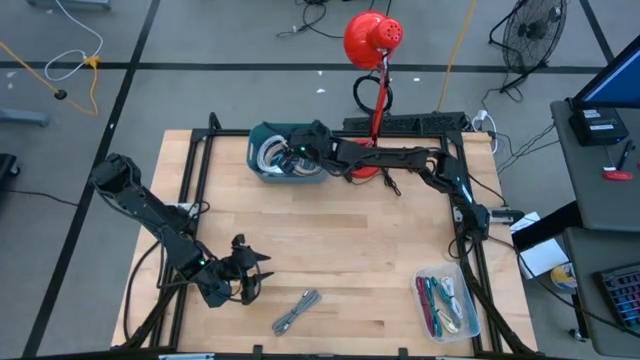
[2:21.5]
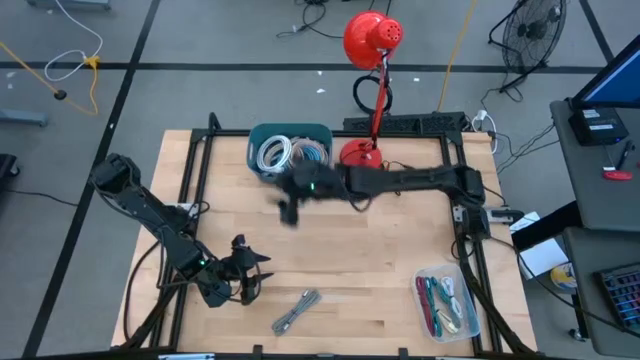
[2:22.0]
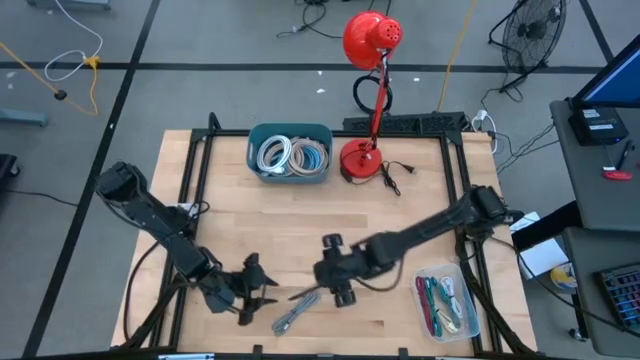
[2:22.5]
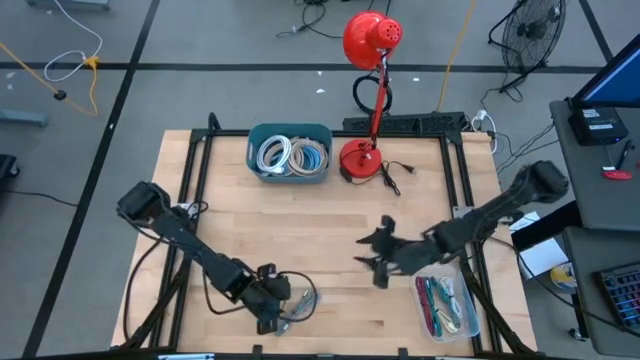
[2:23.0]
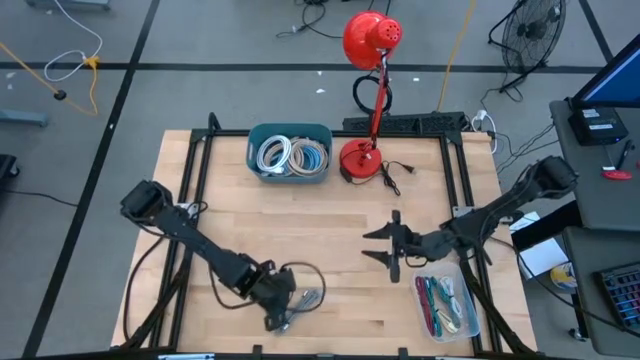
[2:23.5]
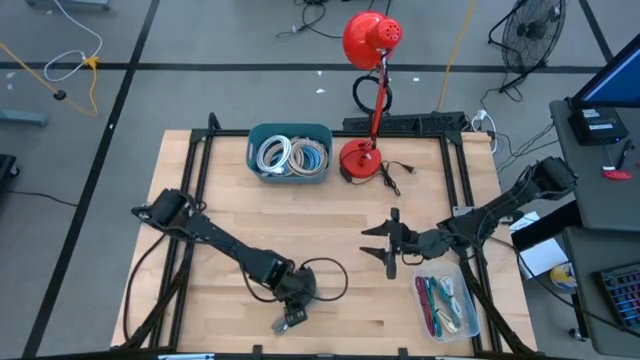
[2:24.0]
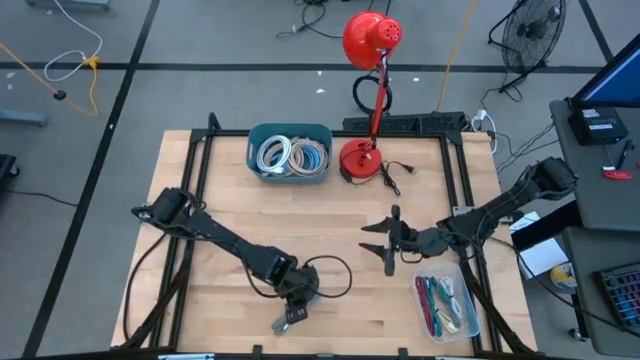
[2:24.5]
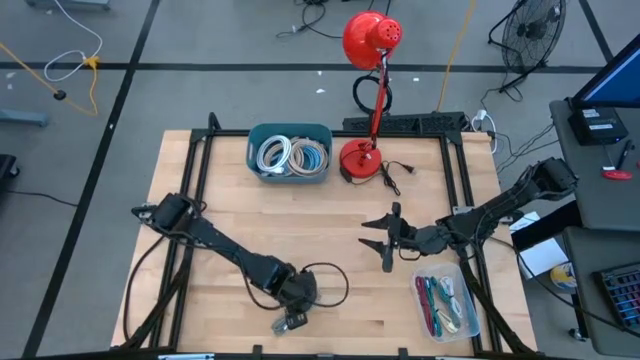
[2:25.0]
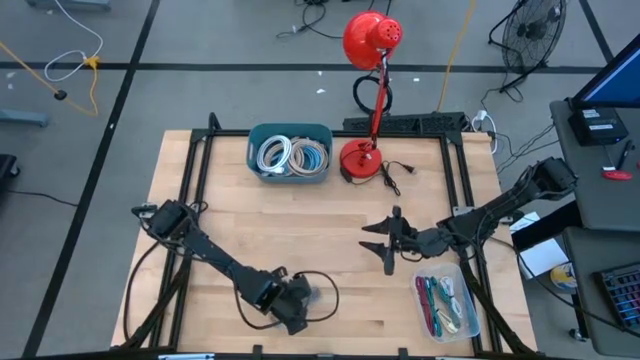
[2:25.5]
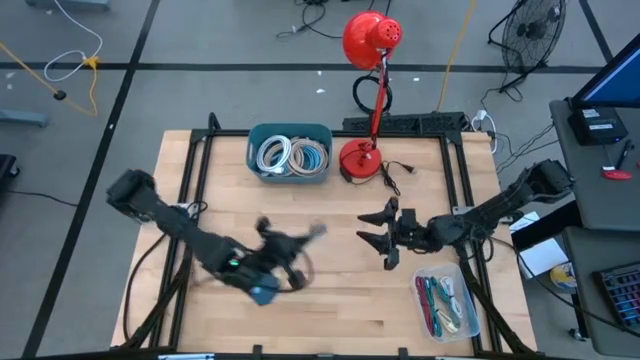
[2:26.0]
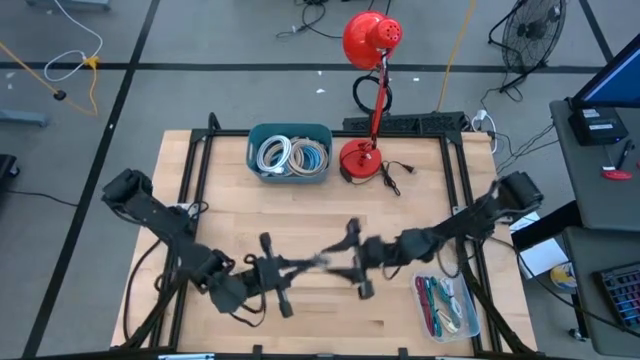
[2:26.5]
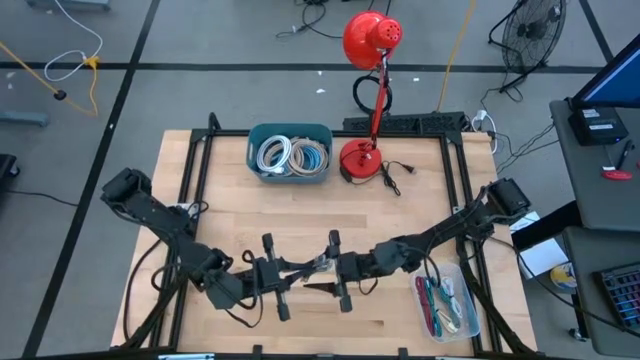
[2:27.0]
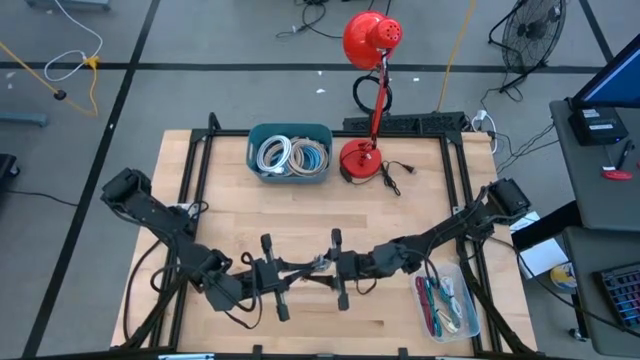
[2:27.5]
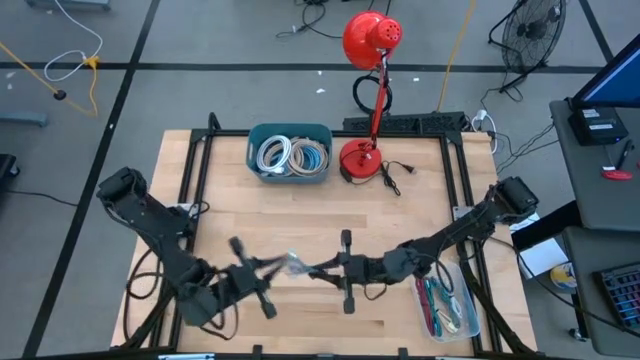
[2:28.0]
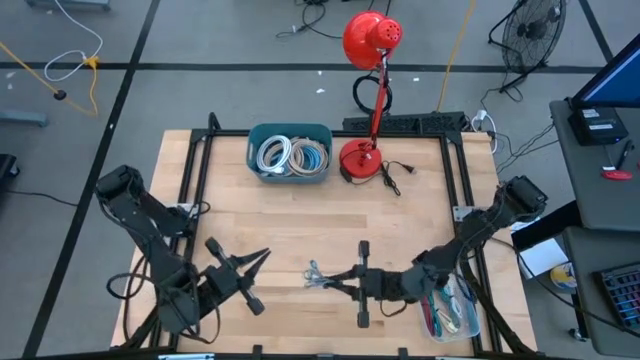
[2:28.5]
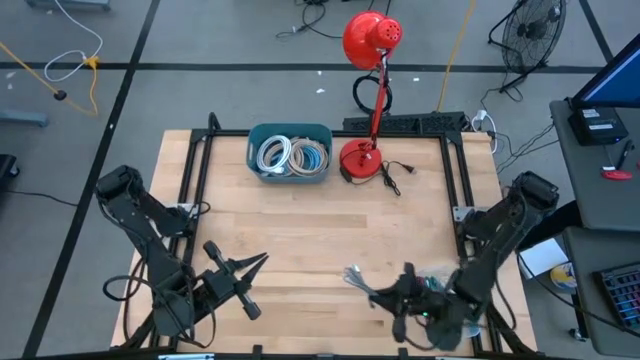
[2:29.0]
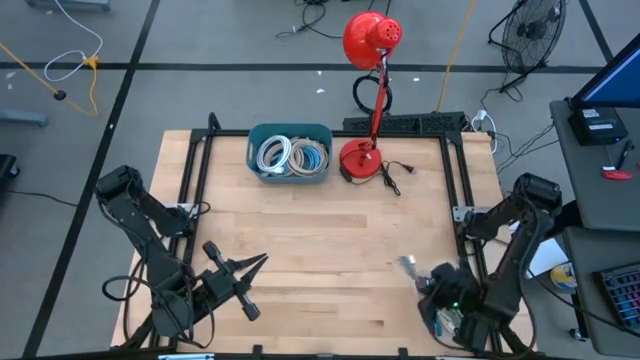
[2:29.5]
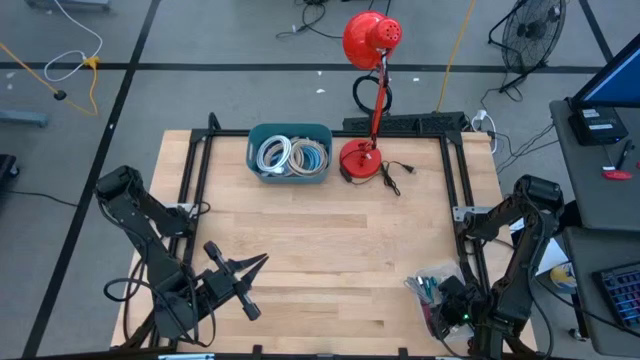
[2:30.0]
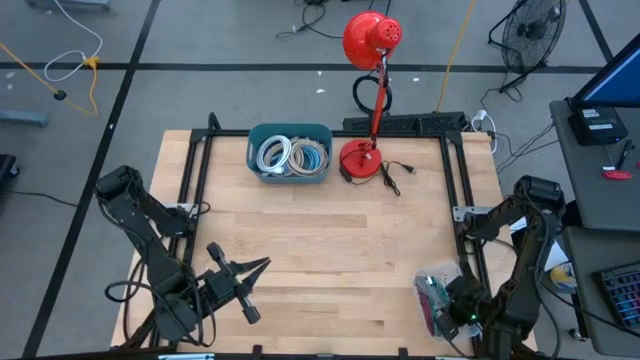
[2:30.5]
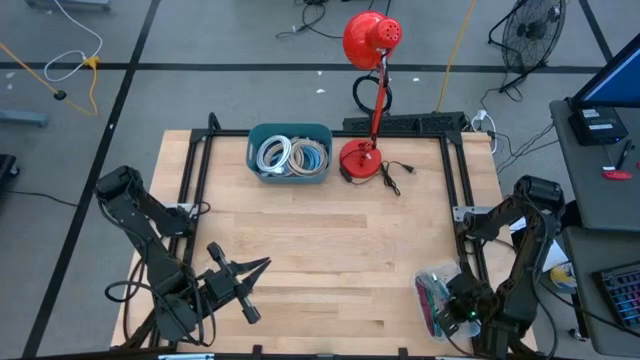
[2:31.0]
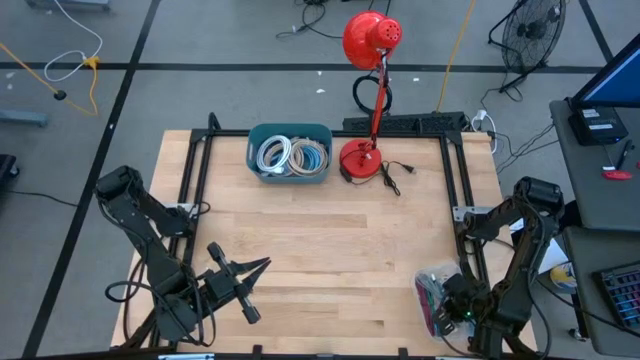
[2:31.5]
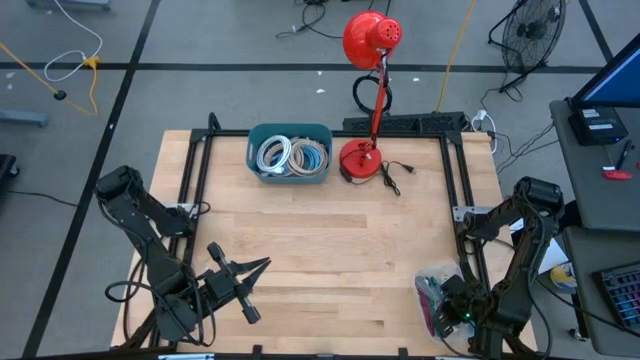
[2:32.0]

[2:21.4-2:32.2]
Task: Pick & Place USB Port
Put the black charger cable into the transparent bin

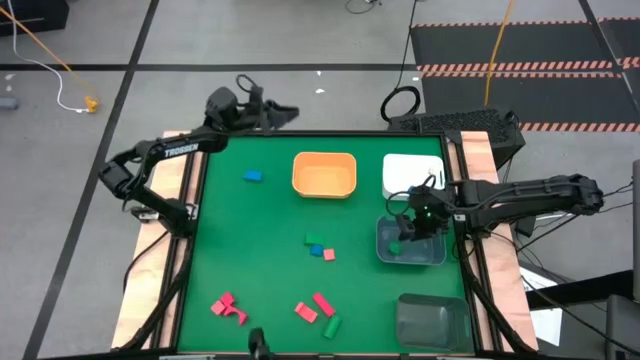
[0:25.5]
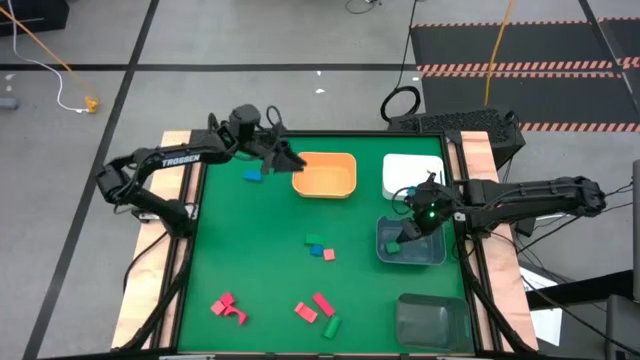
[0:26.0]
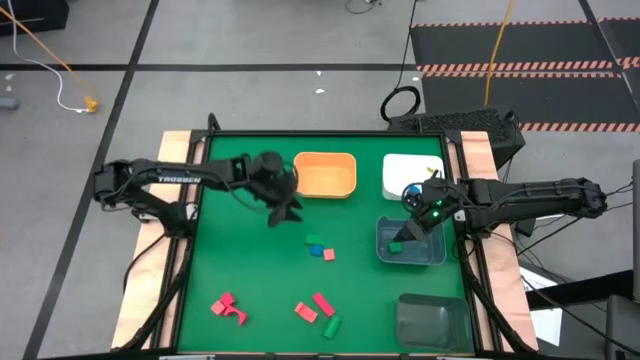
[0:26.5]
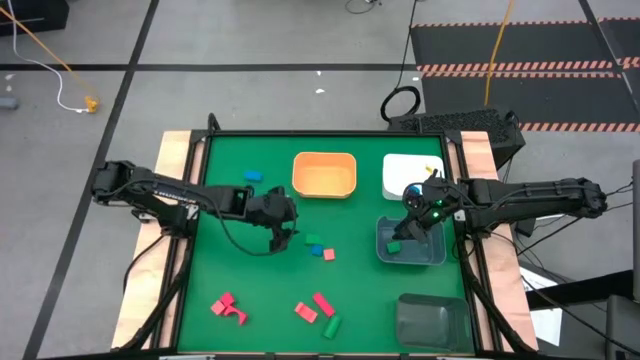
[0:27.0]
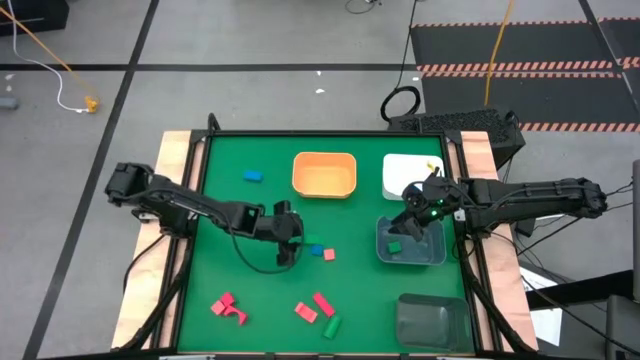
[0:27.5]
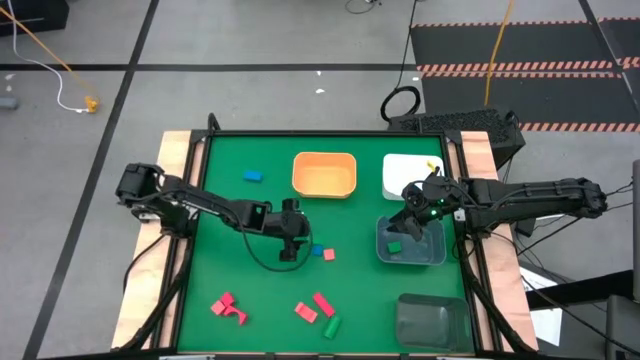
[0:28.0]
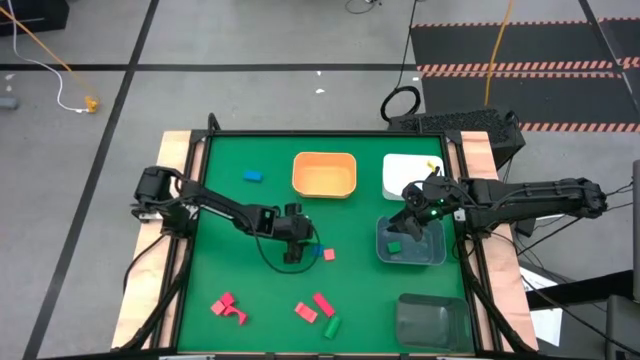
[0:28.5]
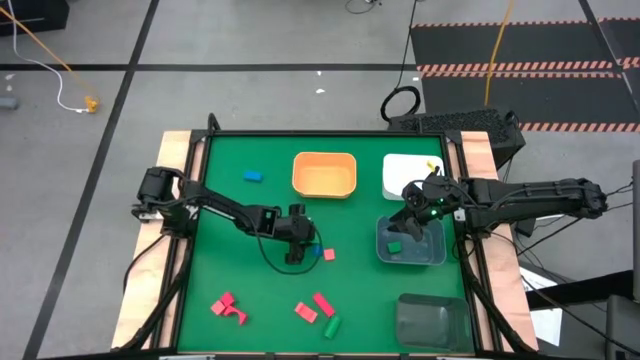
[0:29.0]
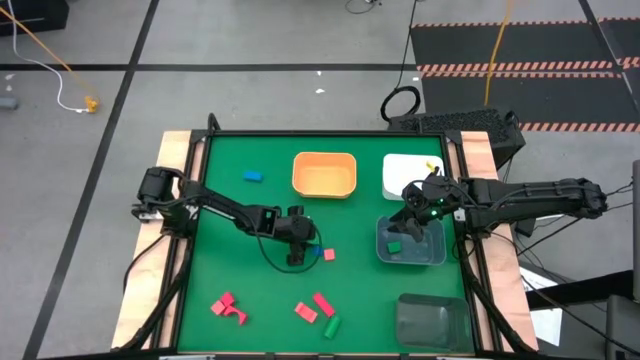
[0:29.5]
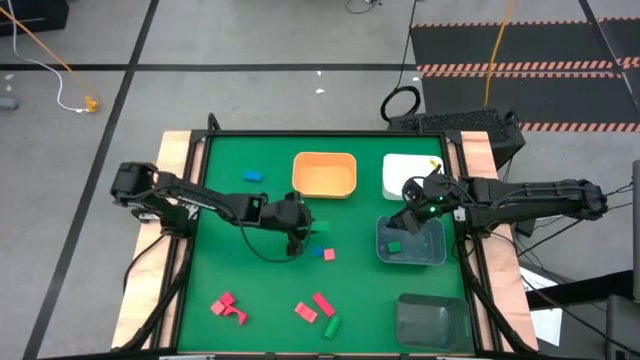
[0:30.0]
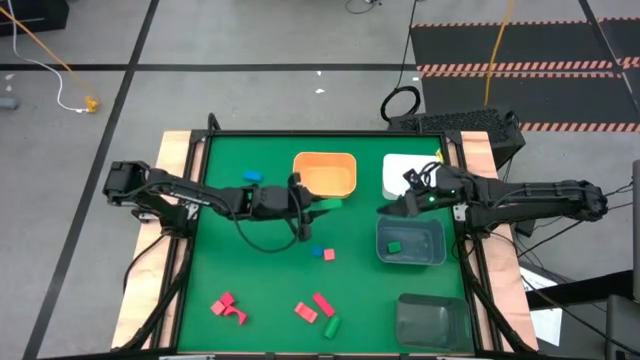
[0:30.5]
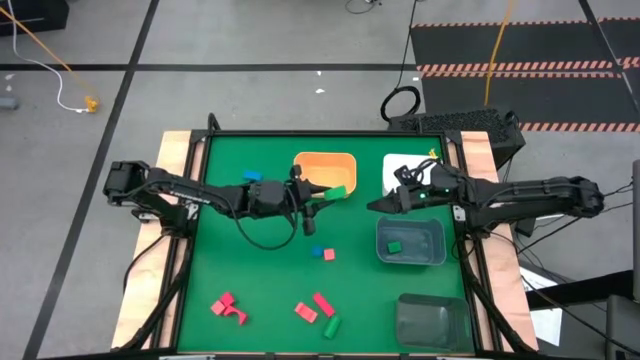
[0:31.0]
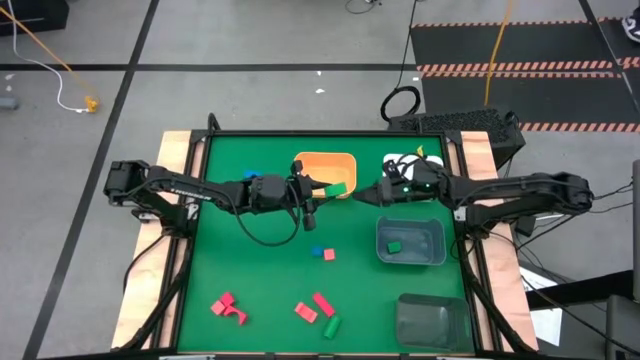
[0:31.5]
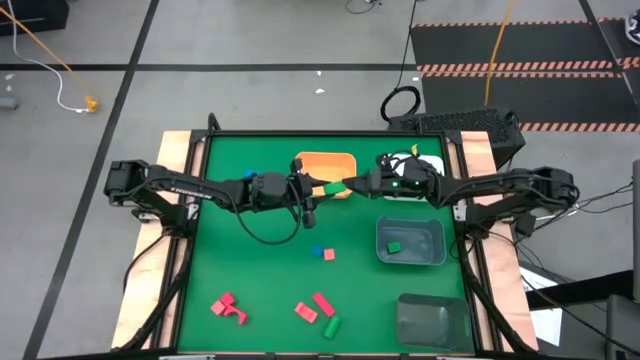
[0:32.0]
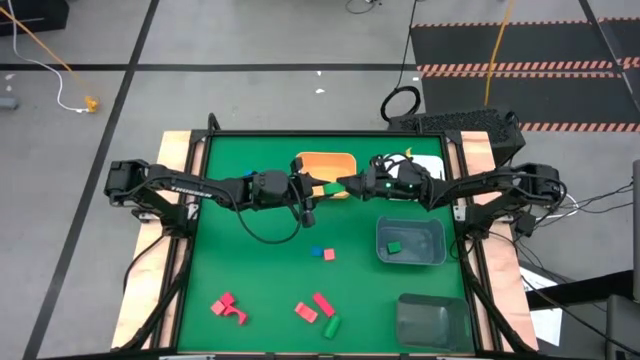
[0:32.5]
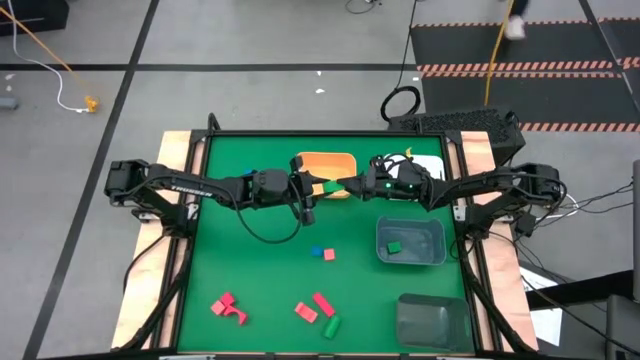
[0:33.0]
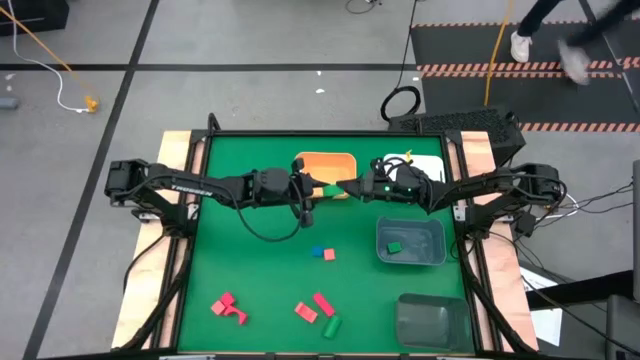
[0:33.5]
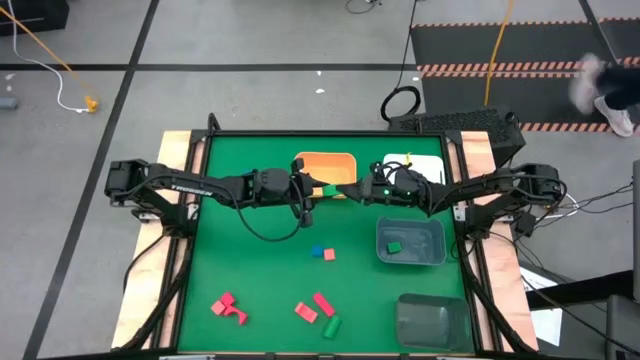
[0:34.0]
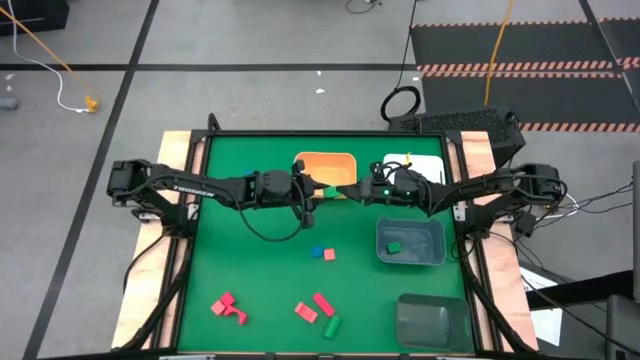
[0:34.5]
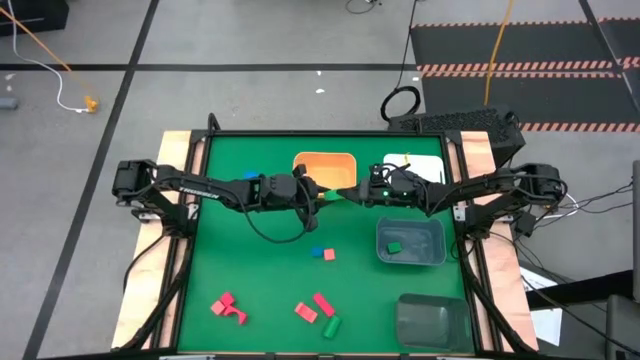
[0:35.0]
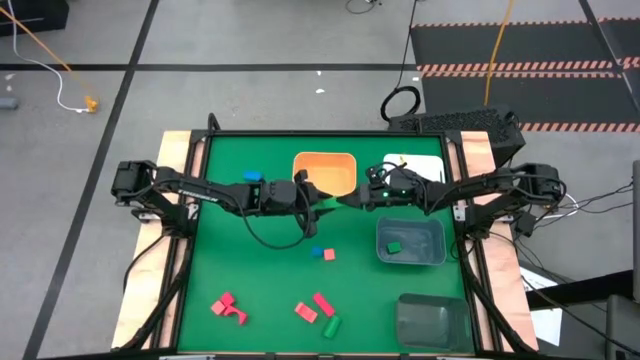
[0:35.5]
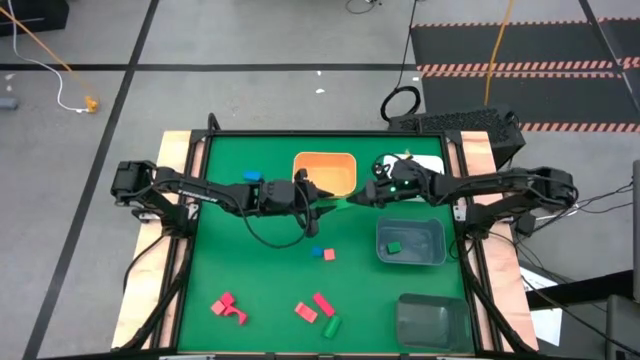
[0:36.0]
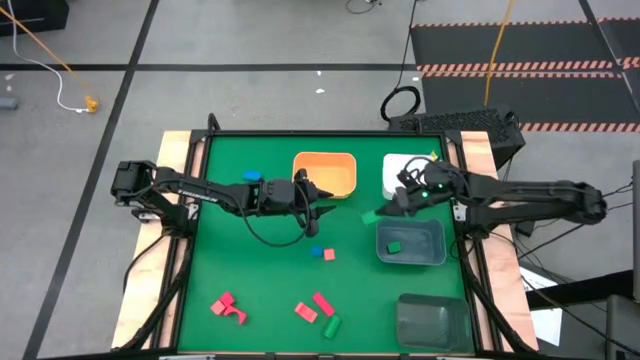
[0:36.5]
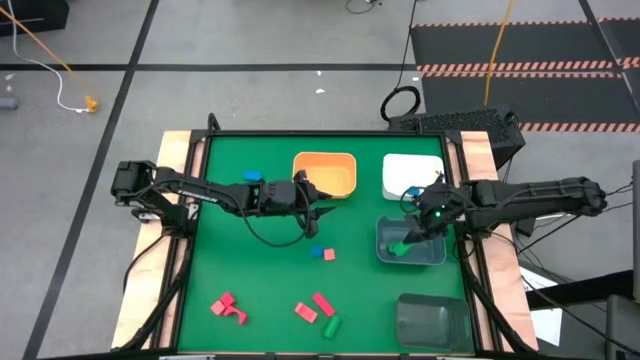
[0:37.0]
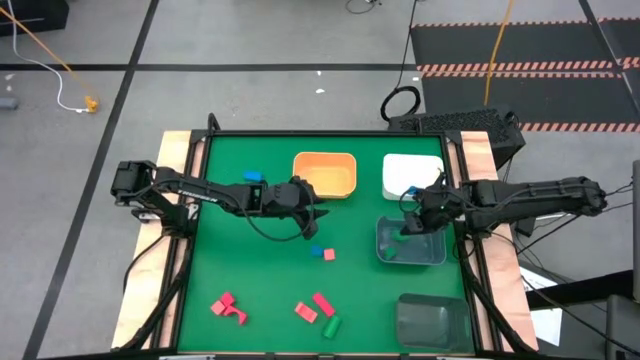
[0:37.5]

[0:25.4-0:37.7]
Task: Sort & place blocks by color
Put the top green block into the dark blue bin
